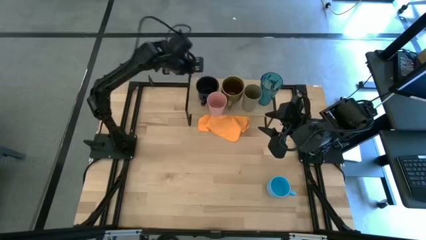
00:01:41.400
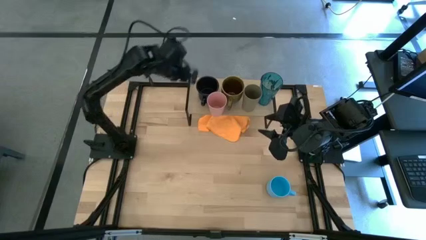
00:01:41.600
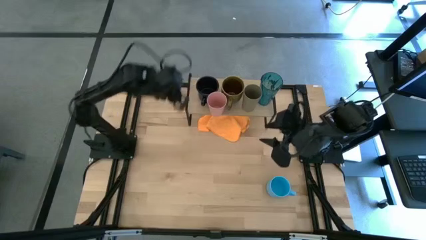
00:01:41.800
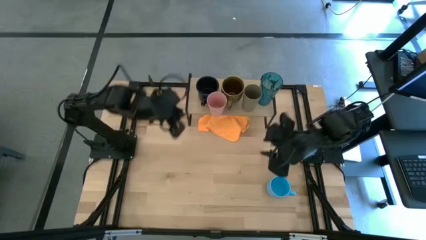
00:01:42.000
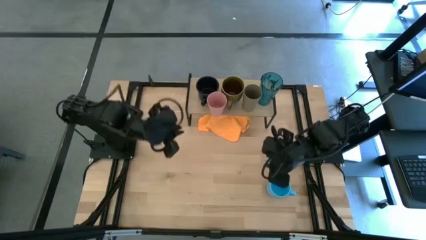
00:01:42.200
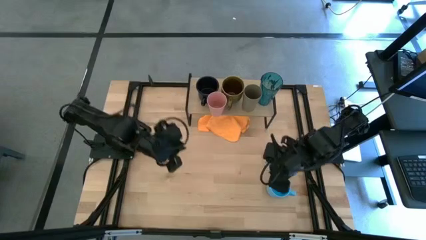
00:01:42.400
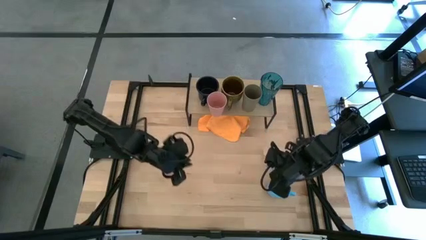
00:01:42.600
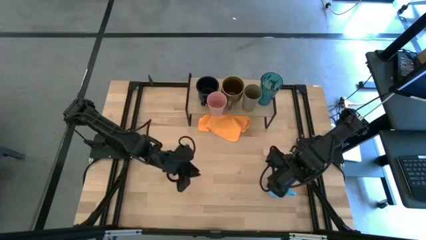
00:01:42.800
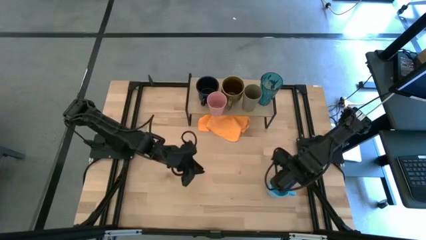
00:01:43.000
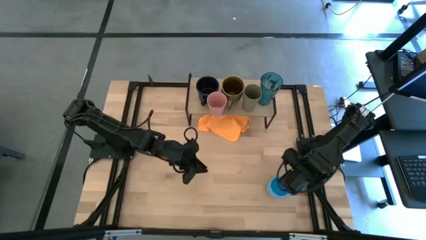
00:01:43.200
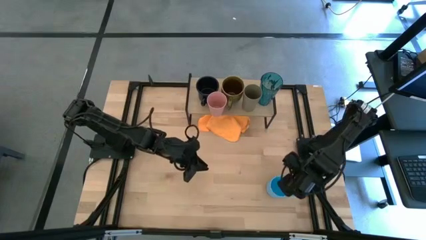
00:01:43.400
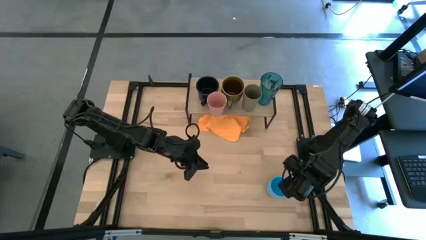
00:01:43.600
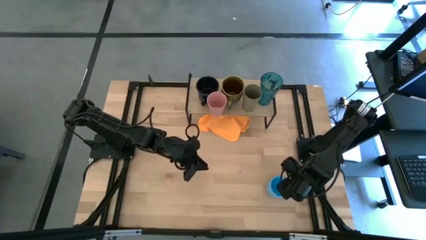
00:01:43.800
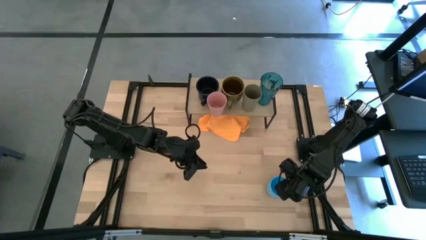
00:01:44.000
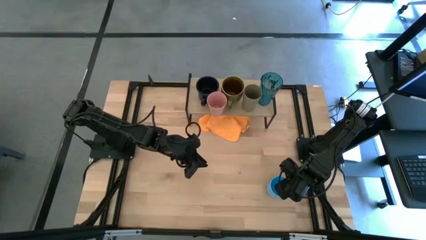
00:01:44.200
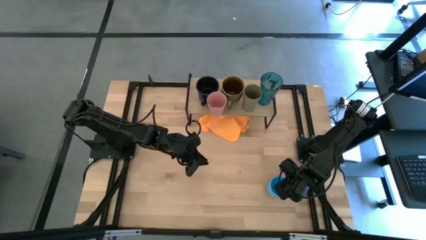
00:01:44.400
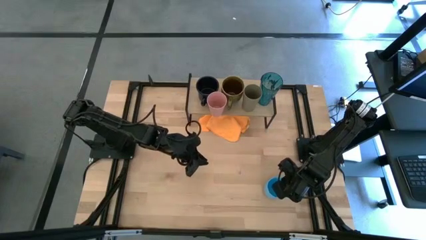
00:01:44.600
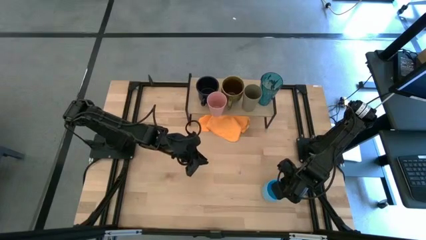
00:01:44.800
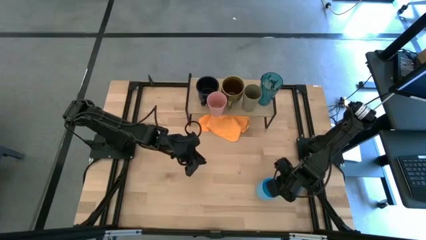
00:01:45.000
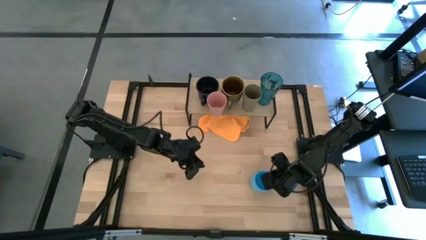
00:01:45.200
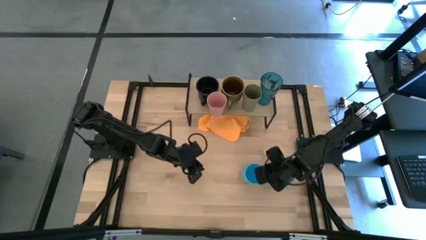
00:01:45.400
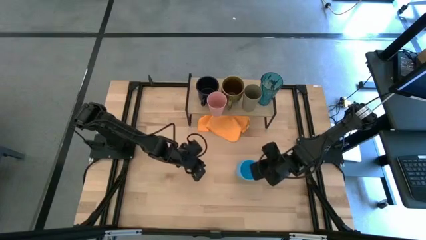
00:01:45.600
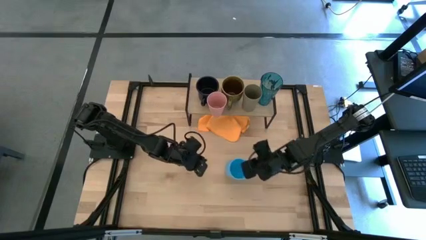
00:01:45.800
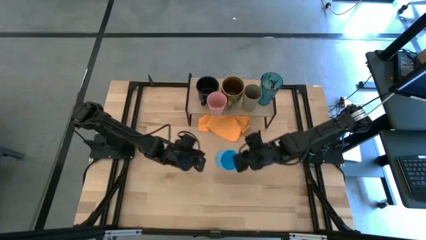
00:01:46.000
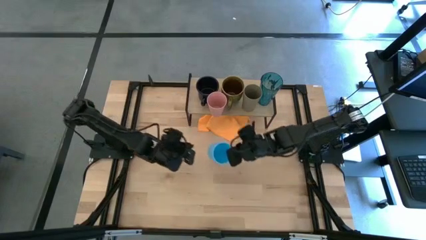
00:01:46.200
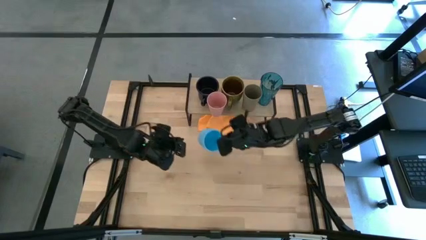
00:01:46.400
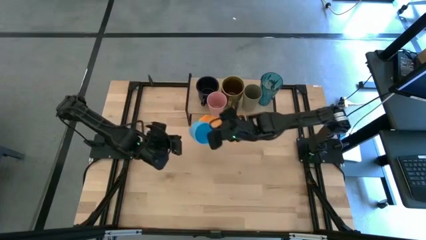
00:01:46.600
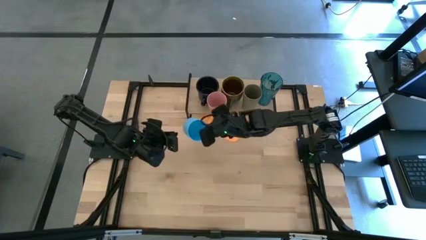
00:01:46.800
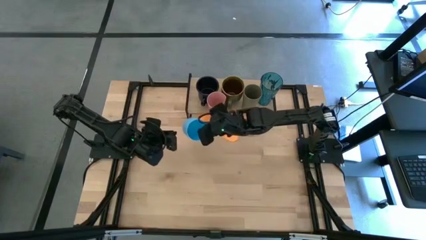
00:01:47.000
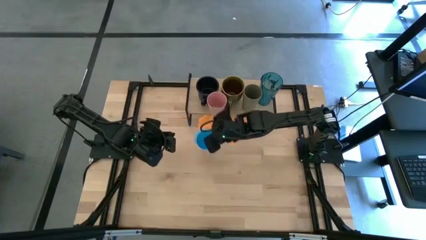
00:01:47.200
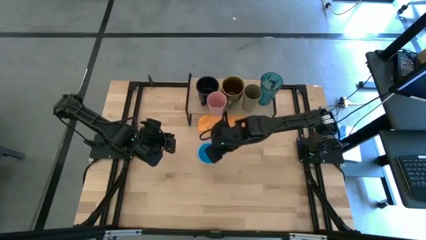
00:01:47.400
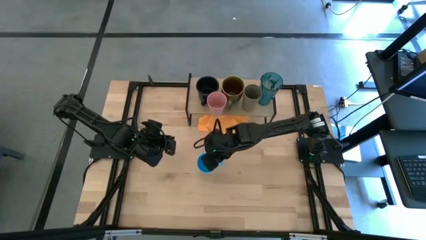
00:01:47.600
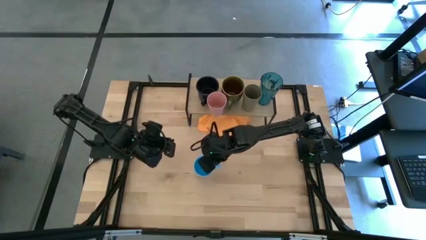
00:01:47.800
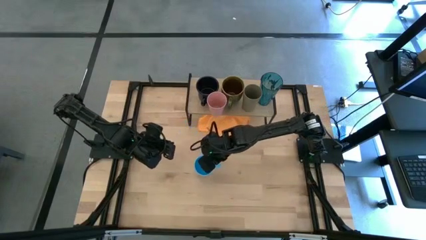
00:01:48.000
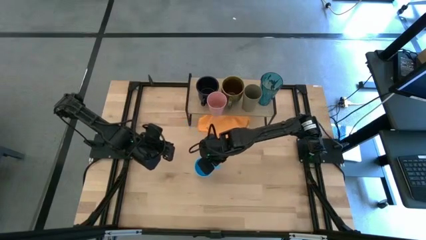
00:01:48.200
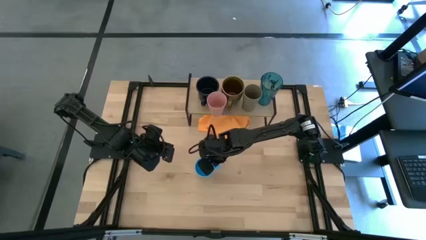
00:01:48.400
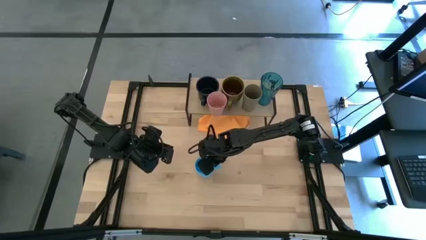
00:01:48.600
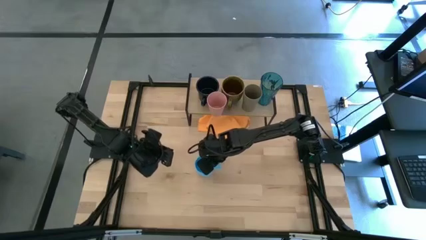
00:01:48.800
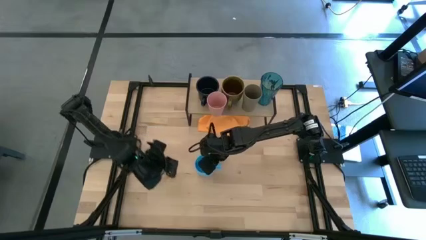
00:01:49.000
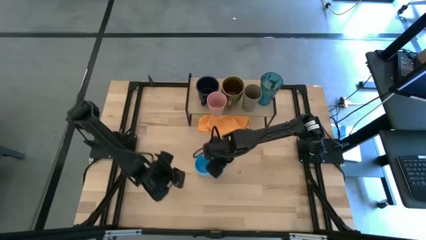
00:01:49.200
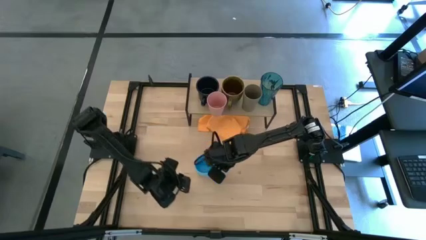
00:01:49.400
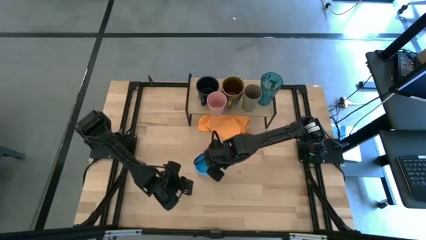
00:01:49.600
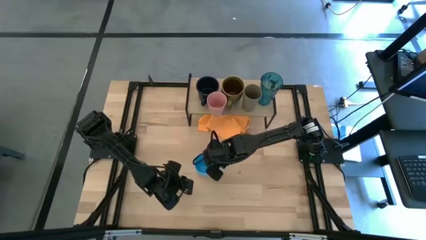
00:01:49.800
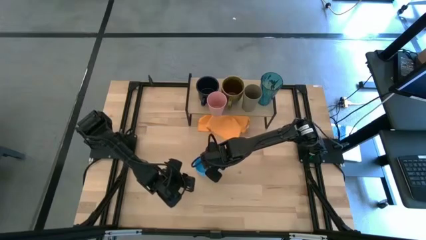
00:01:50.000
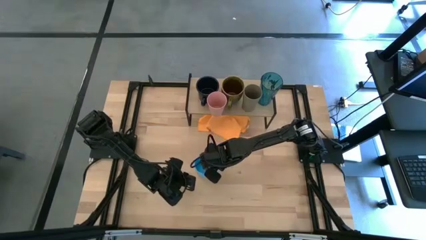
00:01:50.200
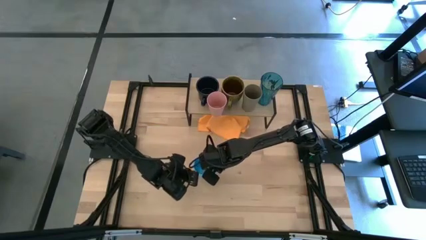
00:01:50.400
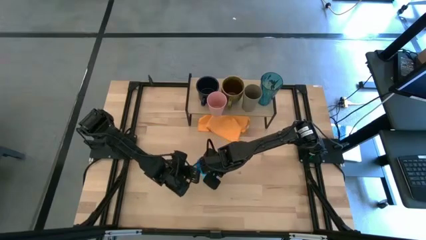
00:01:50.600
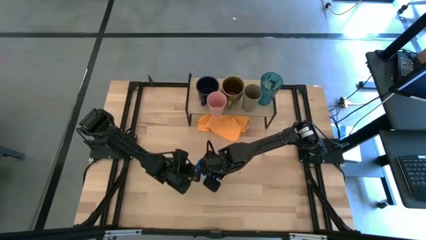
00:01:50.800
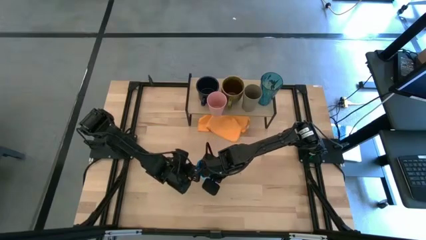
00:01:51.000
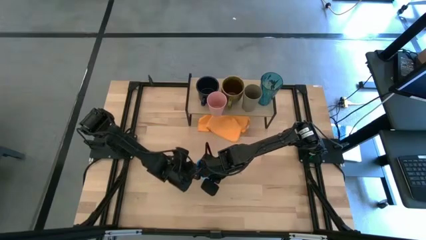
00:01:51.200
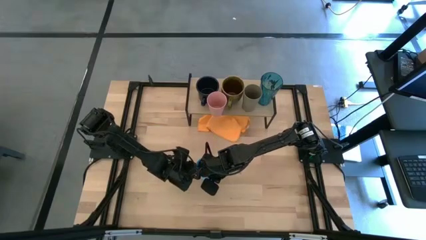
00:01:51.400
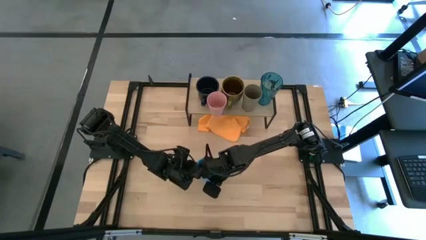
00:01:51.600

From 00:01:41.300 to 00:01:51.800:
Task: Stack small to large cups/mugs on shelf
Put the blue mug on the shelf

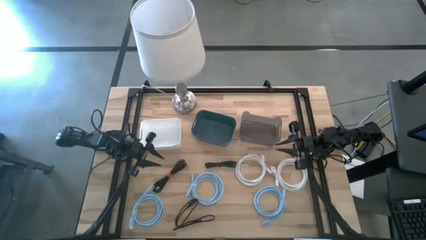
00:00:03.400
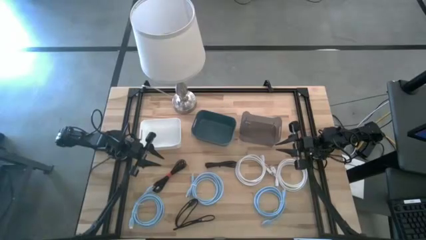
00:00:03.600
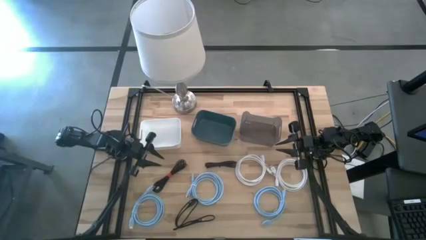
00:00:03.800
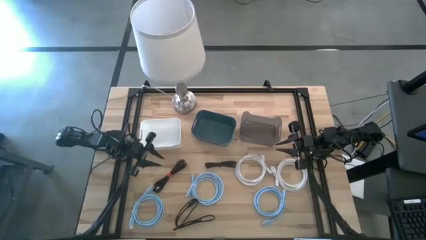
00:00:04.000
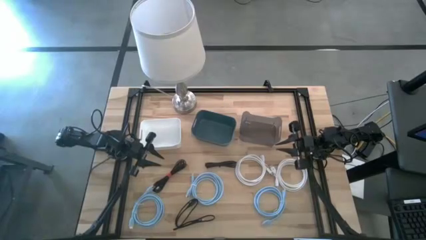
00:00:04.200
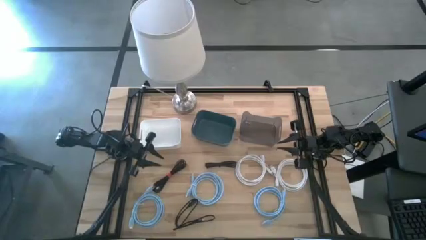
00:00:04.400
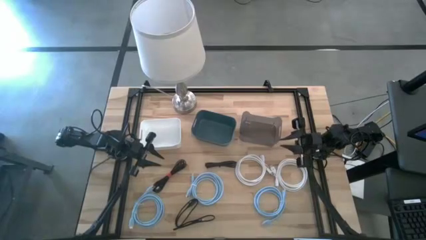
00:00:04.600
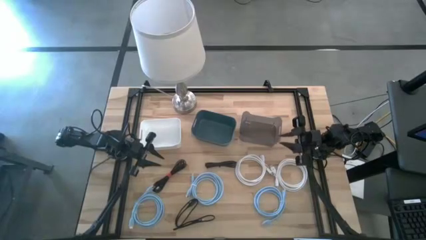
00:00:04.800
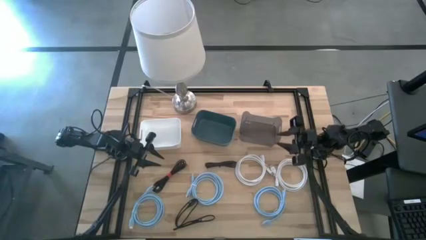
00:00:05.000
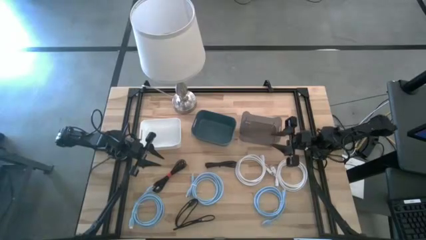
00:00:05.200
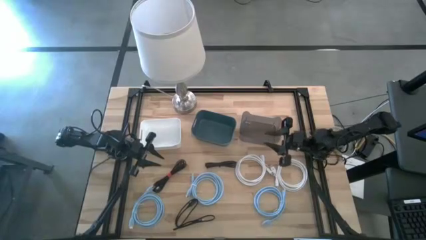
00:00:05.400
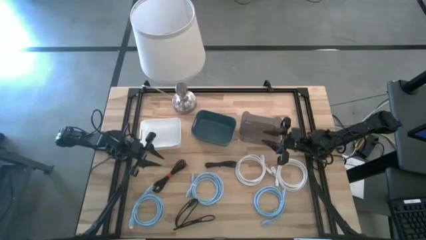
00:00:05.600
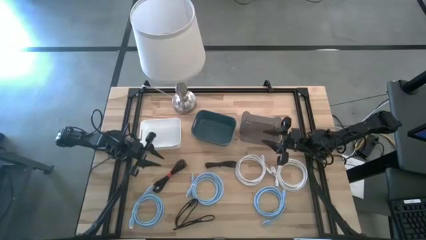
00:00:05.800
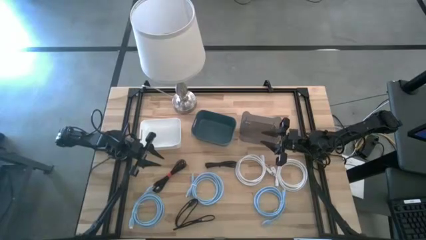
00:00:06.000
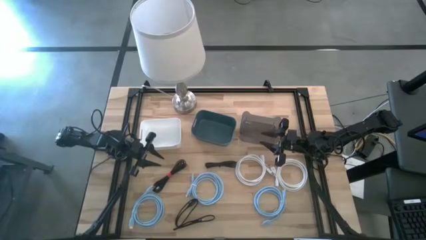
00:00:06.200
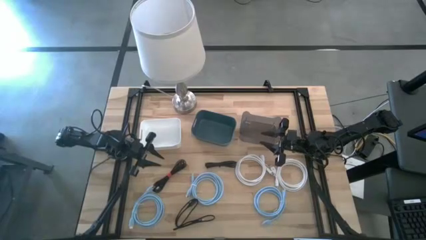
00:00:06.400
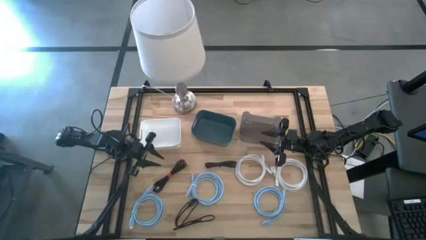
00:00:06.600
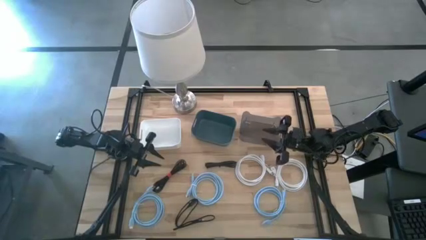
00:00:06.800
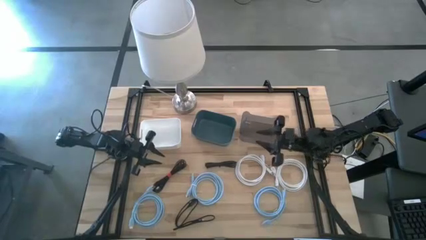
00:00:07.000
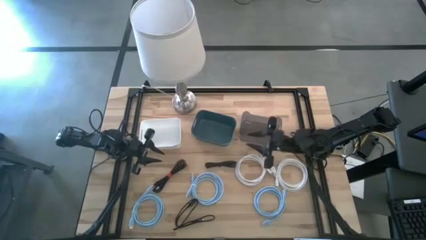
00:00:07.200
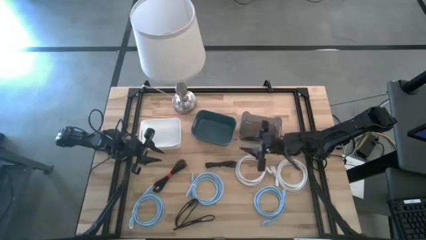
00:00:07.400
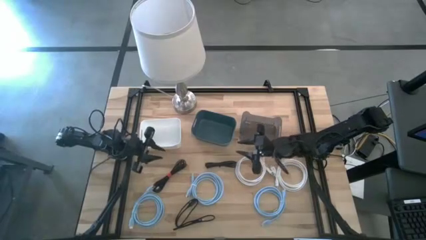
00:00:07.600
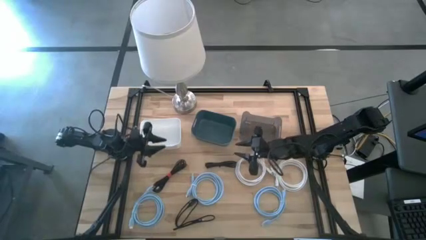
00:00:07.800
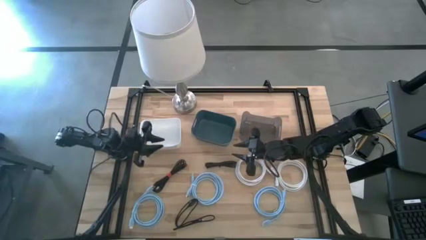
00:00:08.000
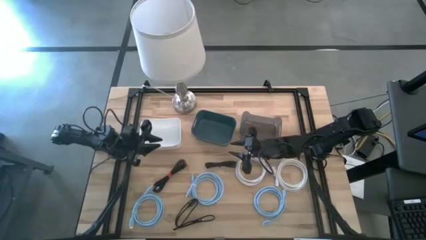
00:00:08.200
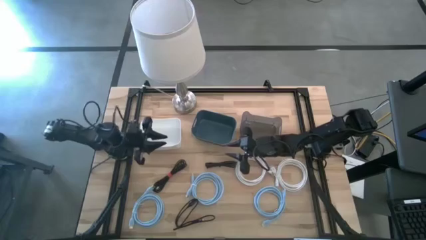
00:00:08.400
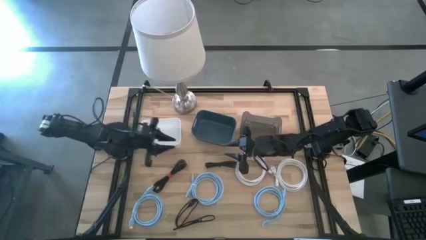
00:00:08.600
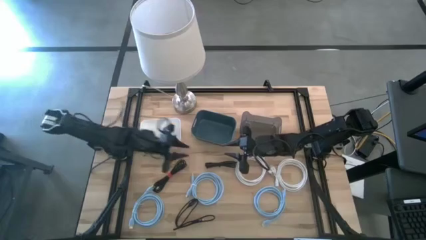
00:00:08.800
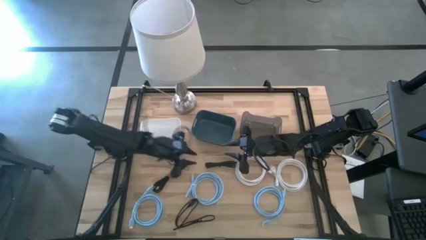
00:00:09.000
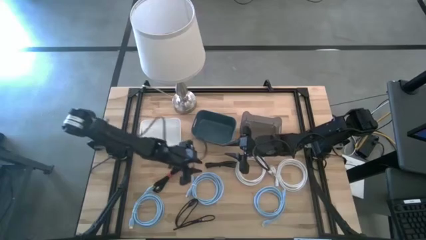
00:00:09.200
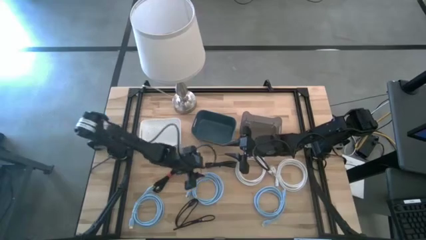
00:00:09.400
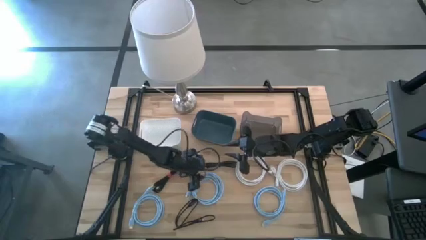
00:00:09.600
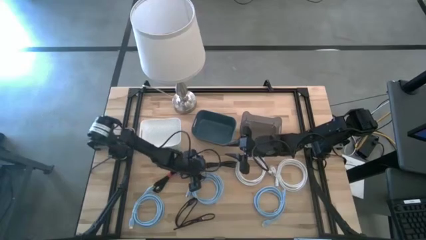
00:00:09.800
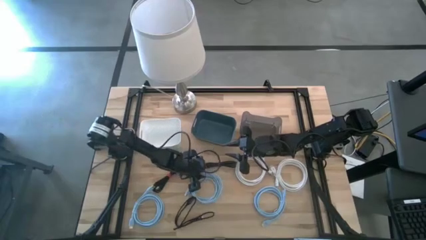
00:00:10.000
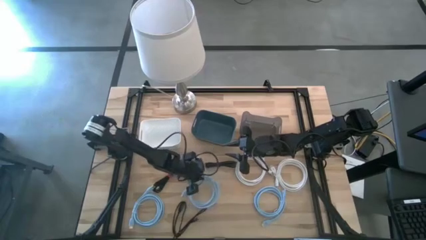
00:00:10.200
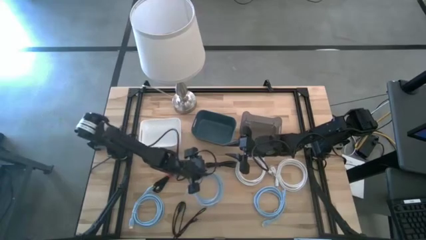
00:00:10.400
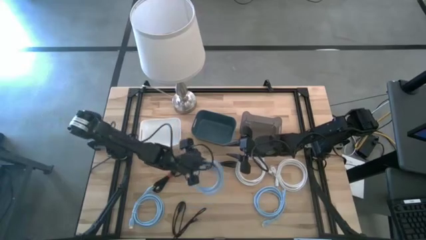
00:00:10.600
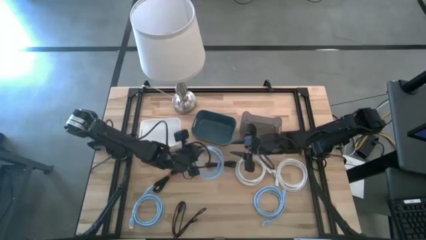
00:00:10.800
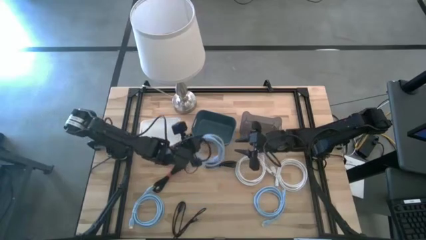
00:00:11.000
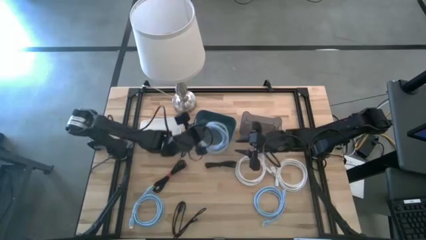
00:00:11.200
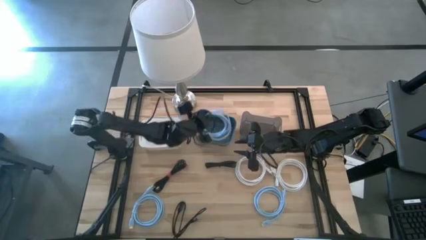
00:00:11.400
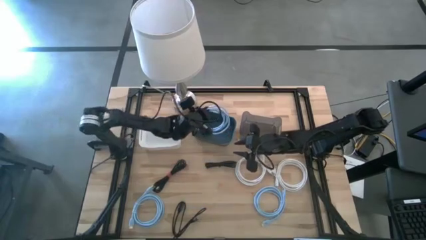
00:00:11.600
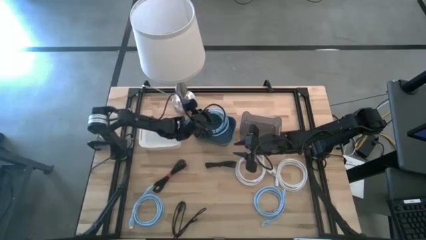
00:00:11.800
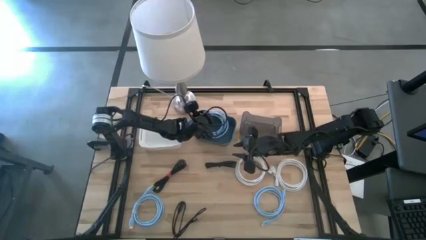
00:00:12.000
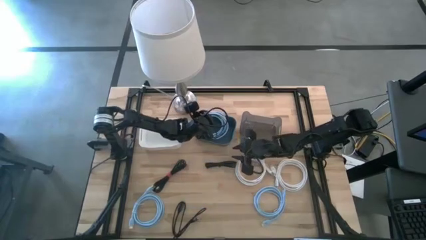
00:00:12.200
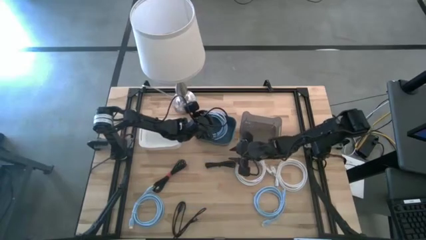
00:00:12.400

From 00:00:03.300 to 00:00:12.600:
Task: Pick & Place USB Port
Put the middle blue charger cable into the blue bin
